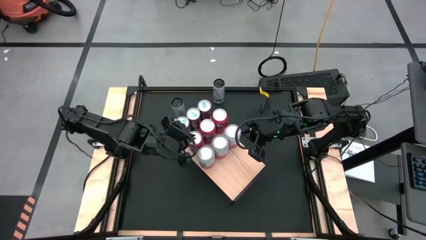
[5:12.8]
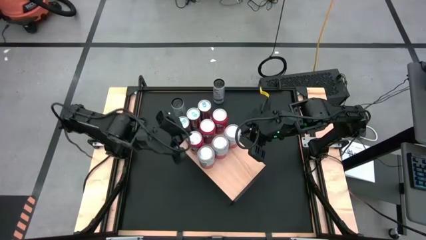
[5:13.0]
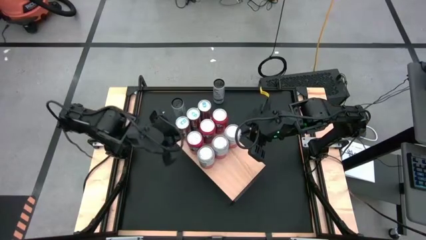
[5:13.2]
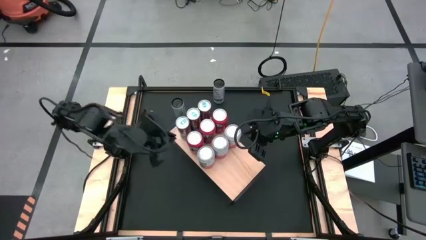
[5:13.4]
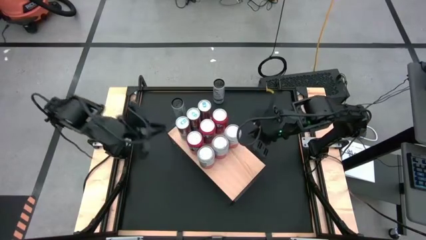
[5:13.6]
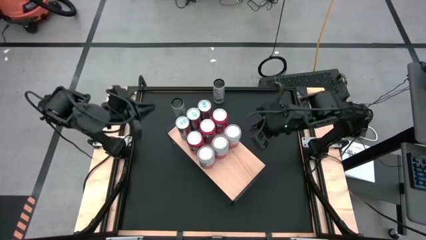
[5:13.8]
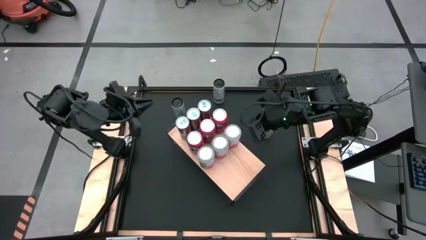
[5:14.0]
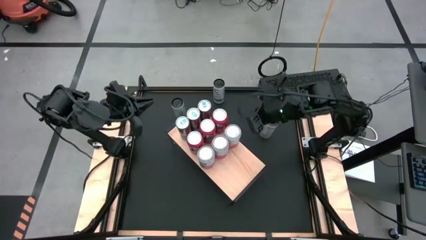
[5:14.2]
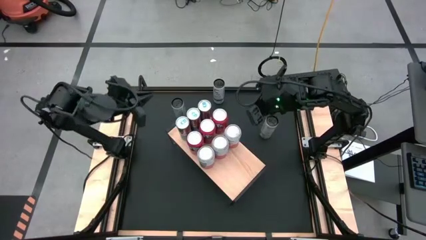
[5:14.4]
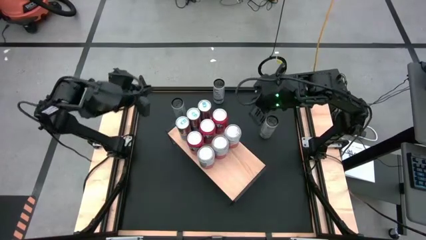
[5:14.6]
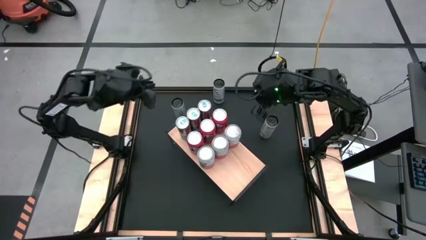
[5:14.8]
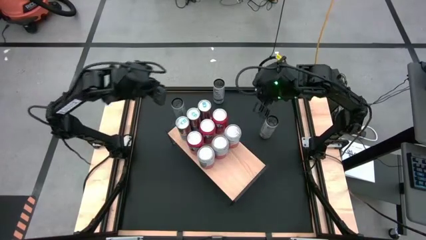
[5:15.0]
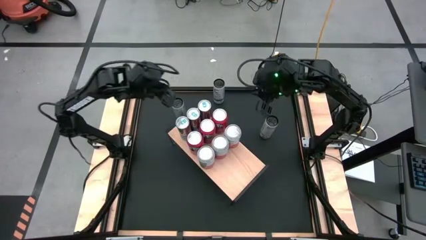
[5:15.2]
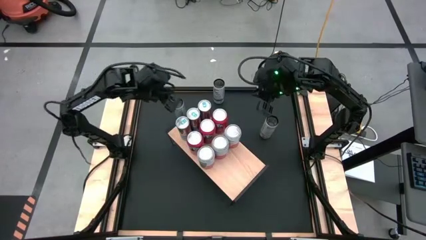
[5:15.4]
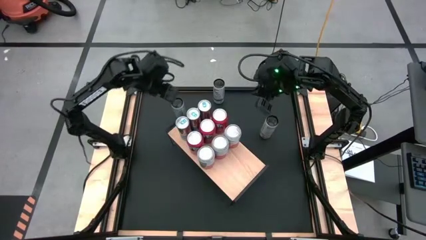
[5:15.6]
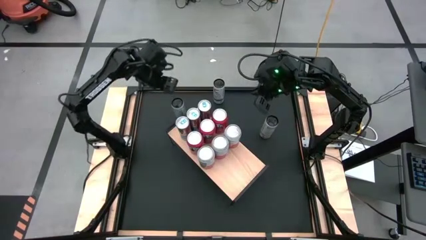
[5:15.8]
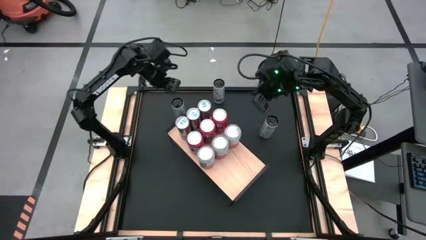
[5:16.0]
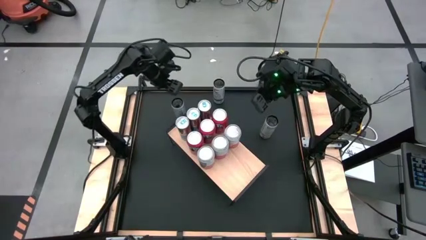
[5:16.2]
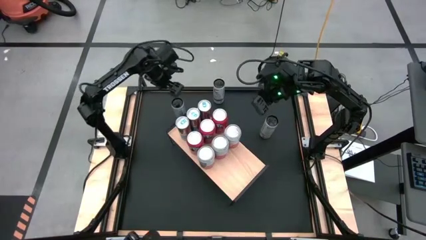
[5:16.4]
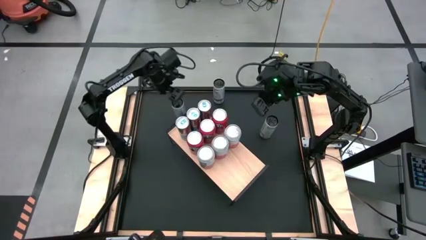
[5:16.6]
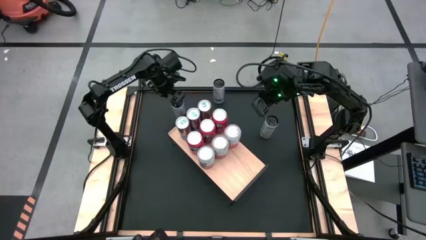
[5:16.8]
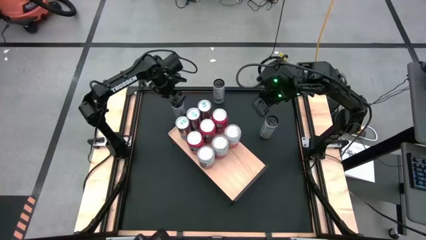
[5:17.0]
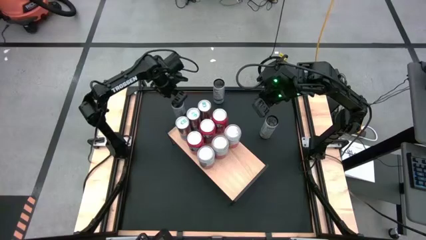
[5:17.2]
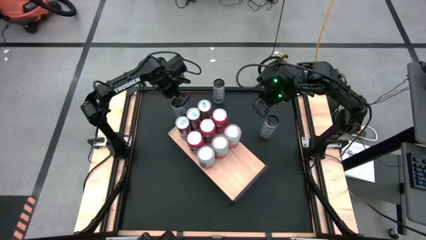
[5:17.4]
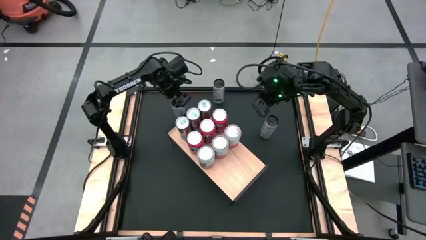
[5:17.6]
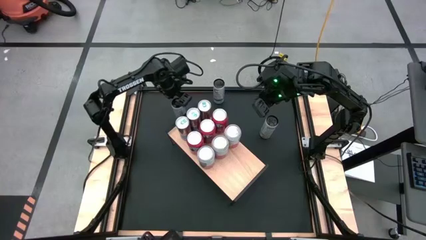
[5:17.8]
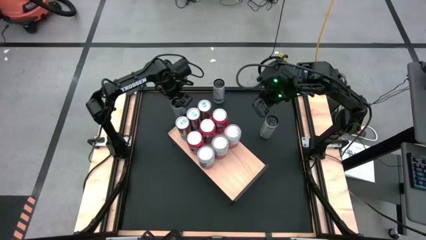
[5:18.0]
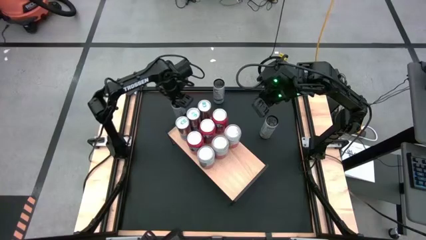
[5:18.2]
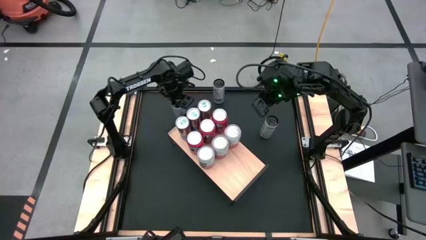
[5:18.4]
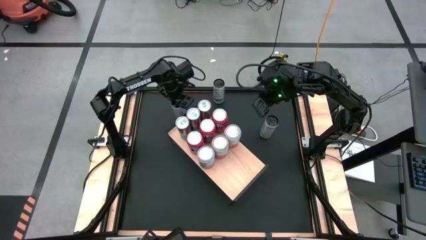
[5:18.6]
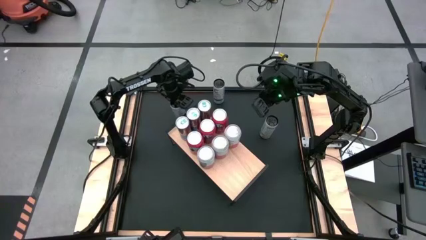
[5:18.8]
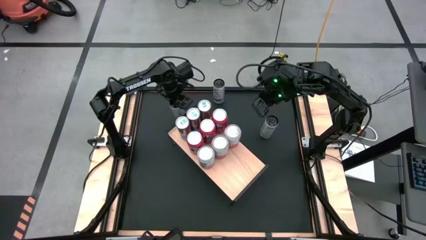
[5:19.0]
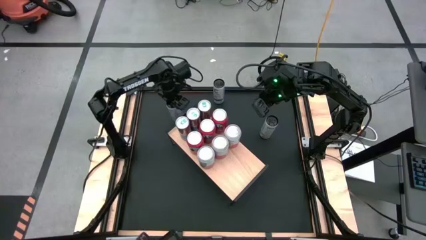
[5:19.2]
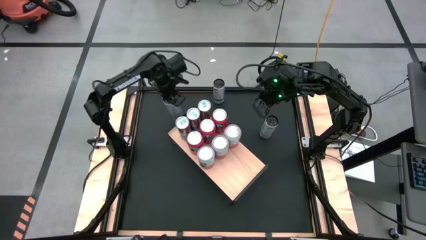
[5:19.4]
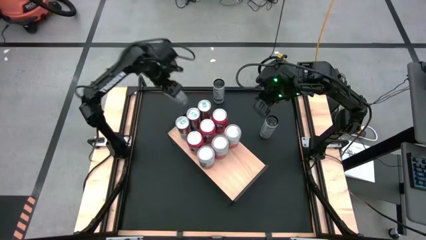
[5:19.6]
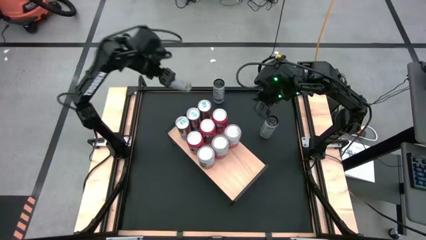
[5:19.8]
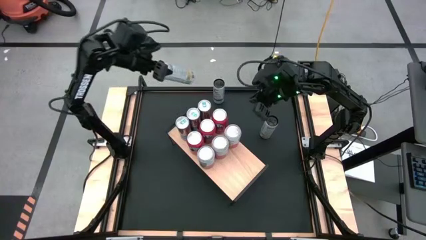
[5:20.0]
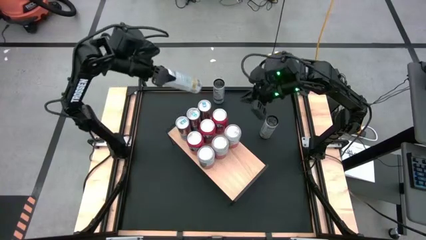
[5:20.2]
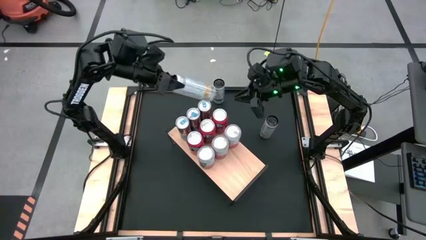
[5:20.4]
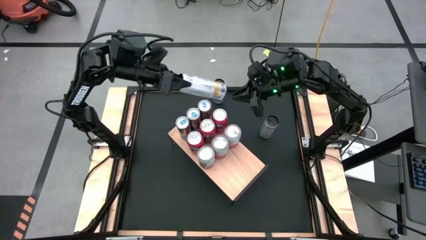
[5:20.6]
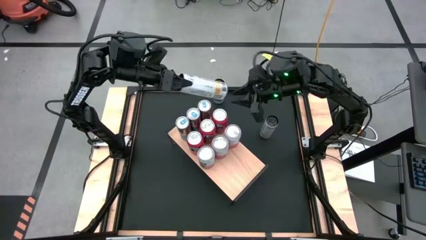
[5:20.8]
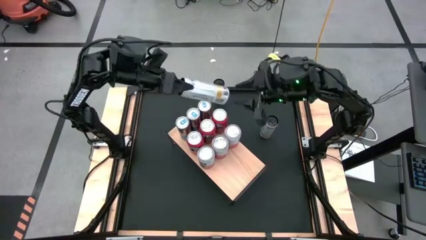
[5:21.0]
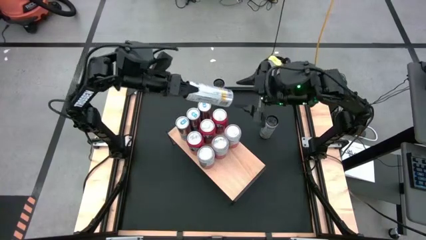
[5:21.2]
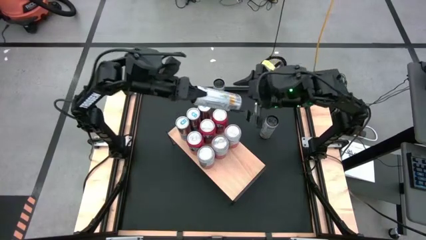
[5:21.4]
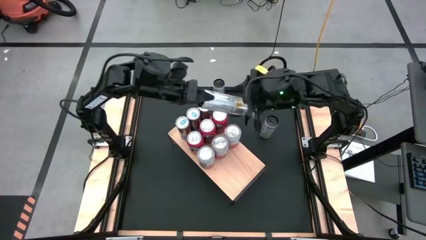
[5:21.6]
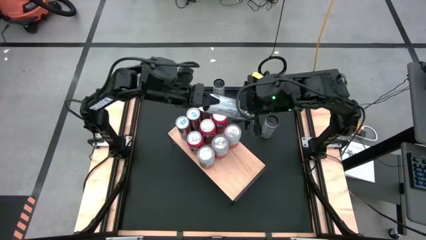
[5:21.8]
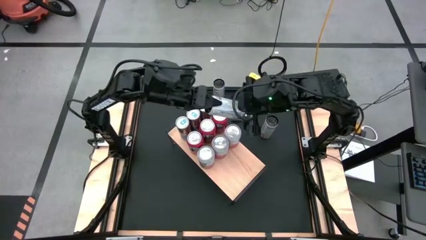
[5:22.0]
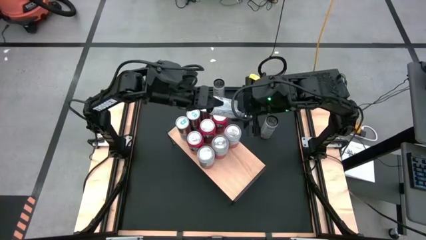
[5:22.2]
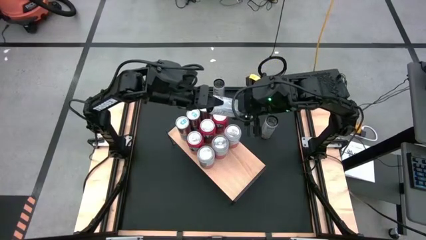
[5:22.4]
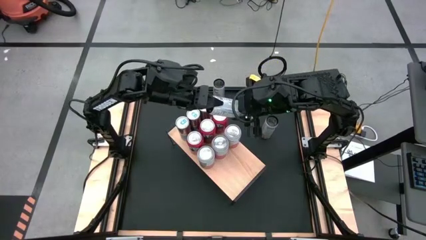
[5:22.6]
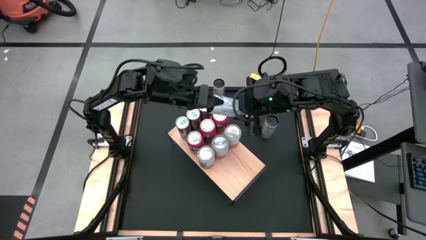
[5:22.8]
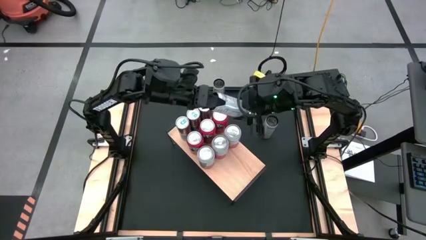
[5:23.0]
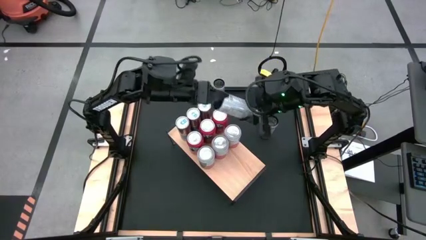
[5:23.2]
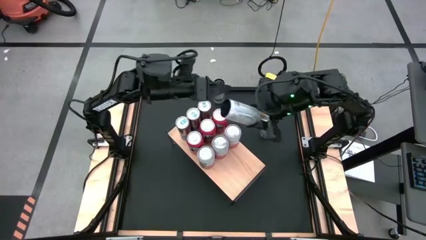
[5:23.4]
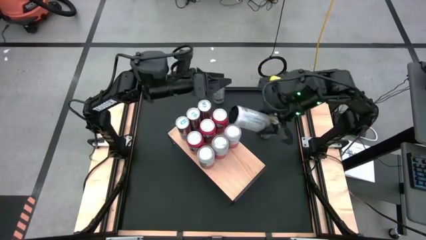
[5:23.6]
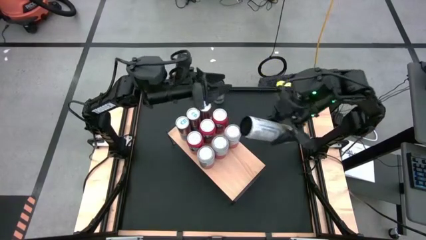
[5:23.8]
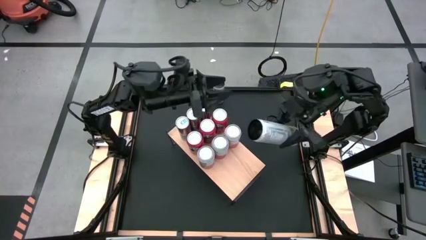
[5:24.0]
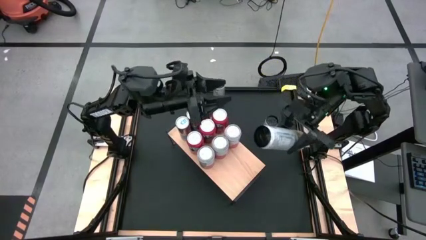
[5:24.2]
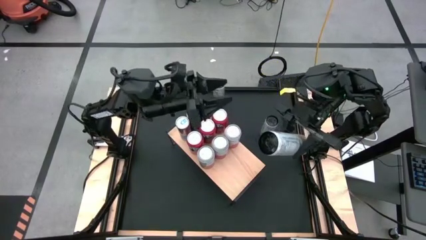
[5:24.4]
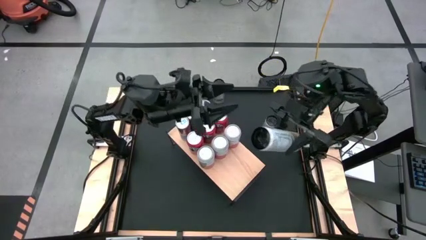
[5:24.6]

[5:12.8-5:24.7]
Task: Place canned beverage on shelf
Put the left white soda can on the shelf

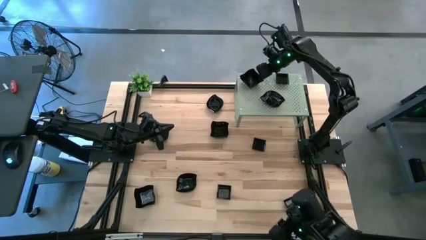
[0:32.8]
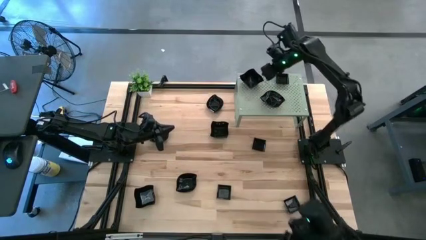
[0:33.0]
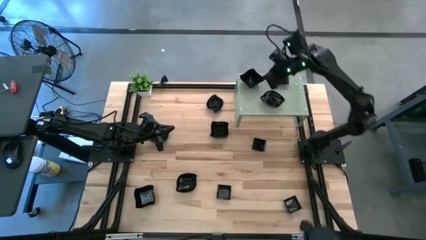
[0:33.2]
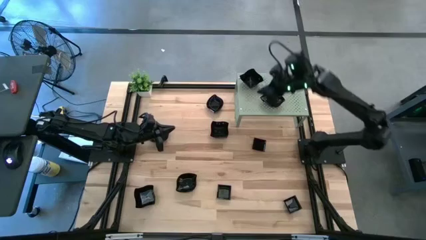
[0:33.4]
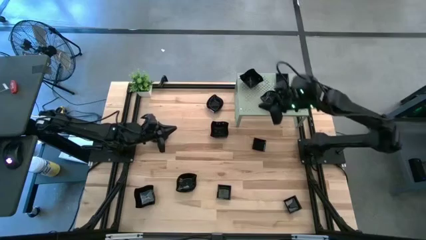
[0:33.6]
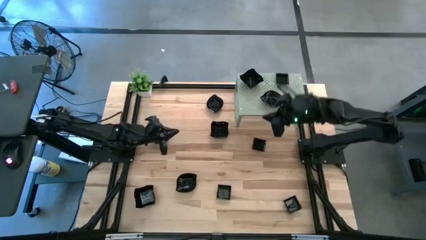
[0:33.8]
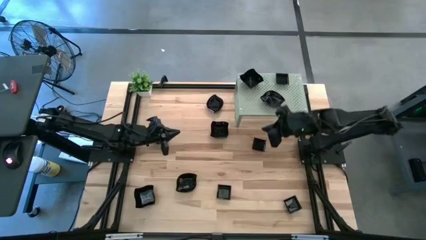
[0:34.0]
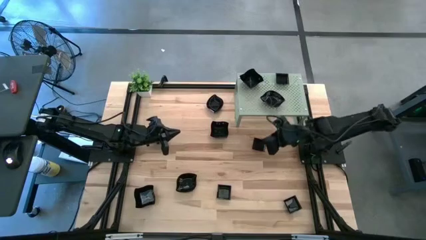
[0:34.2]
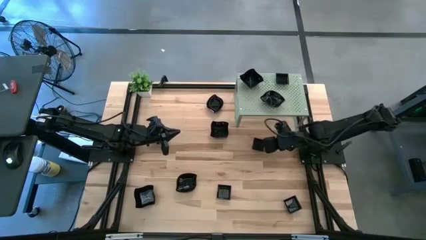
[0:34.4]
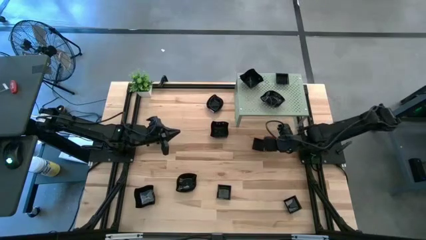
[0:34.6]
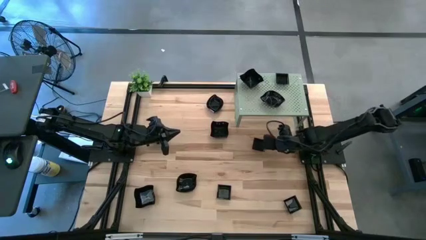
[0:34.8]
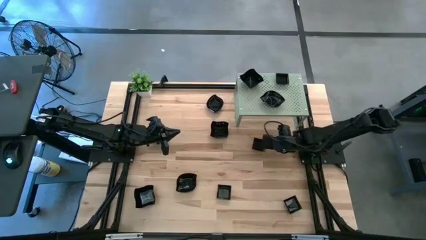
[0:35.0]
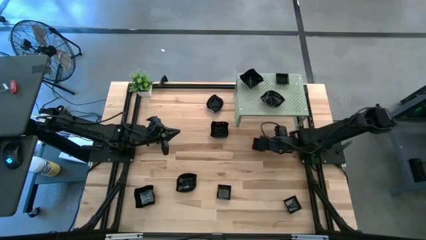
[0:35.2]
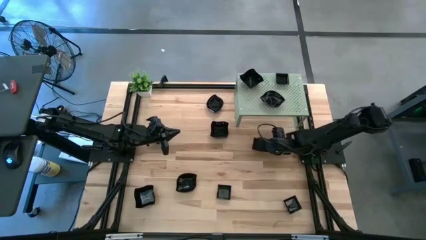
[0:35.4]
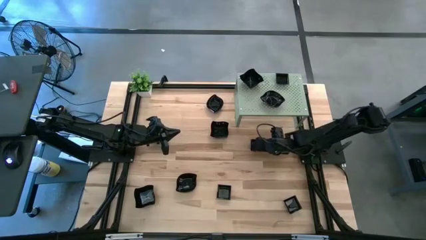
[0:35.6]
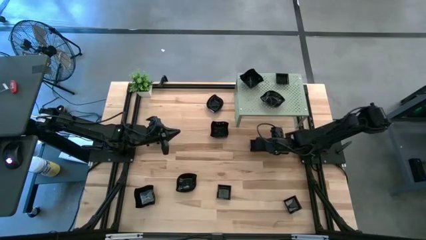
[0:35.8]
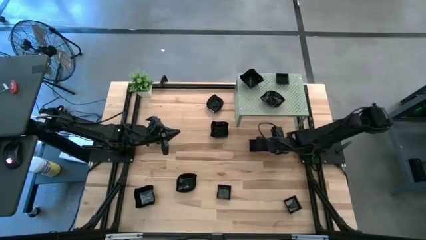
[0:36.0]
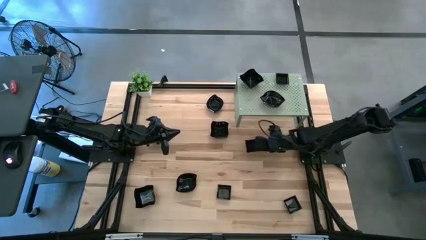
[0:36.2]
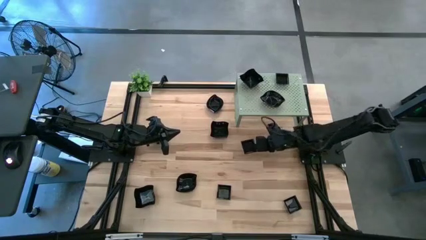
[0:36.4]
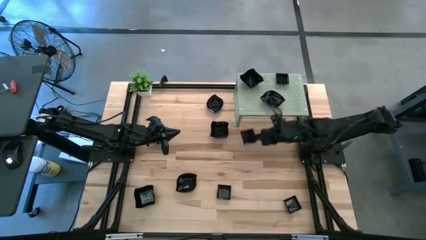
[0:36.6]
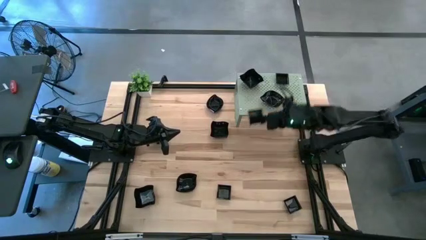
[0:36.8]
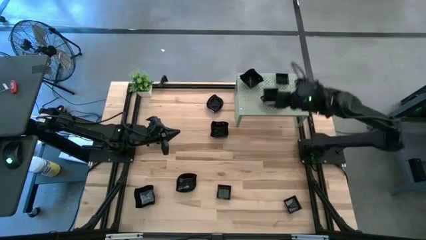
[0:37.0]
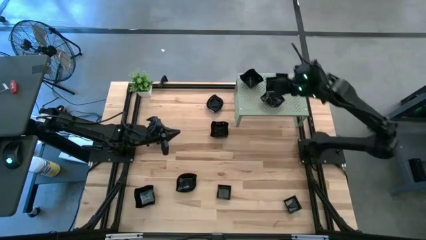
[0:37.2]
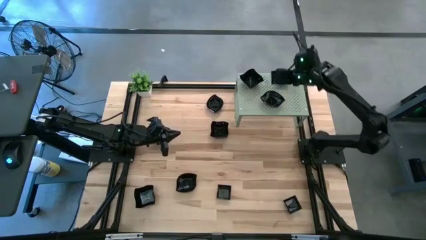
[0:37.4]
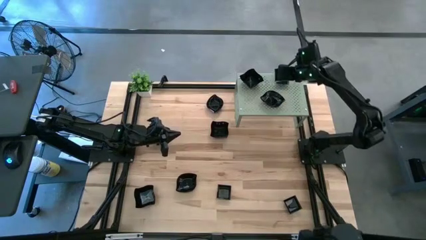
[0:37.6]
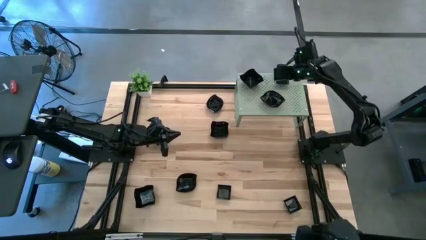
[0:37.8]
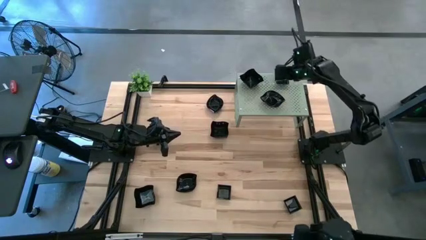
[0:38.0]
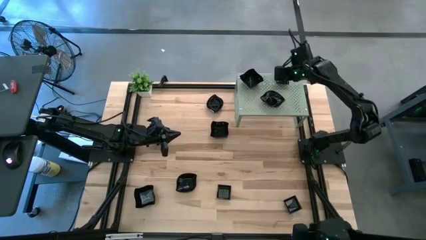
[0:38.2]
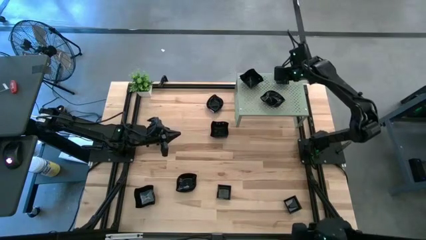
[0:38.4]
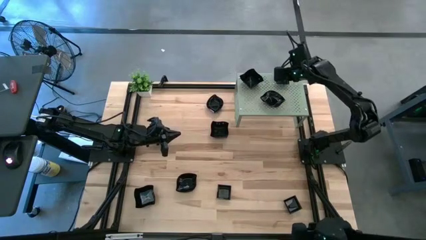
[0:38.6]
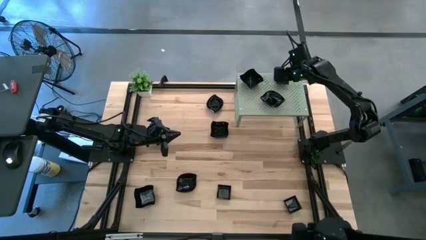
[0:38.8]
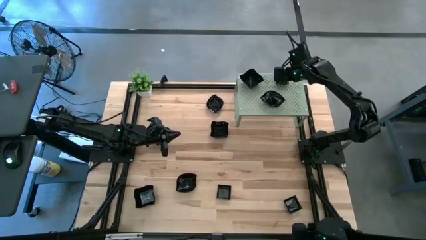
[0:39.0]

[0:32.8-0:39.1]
Task: Pick & Place Mini shaped plates
Stack the square plate on top of the square plate on the shelf
